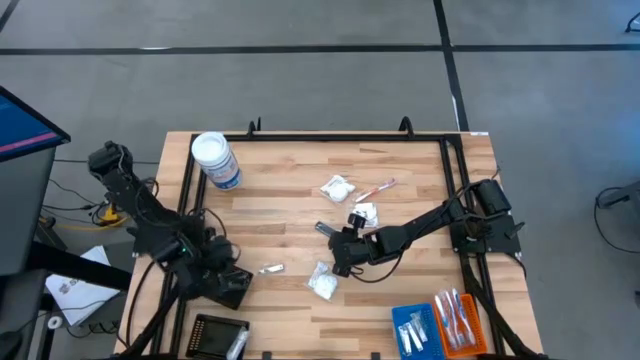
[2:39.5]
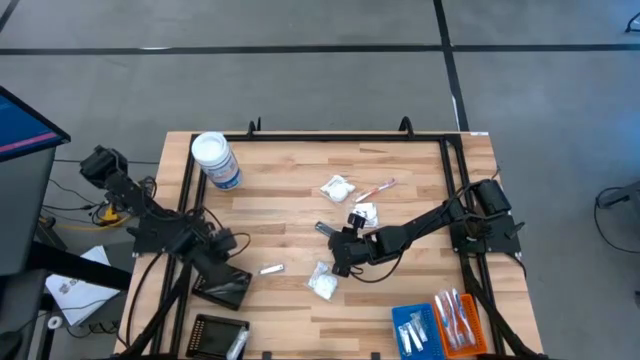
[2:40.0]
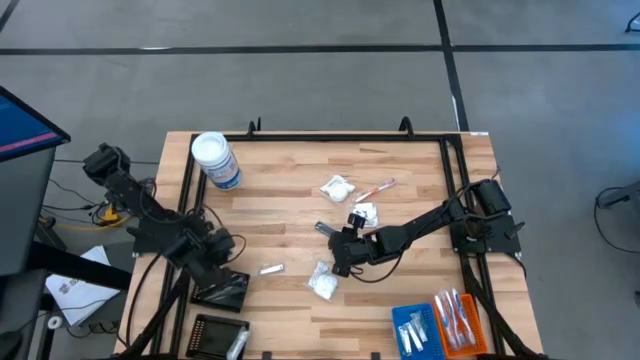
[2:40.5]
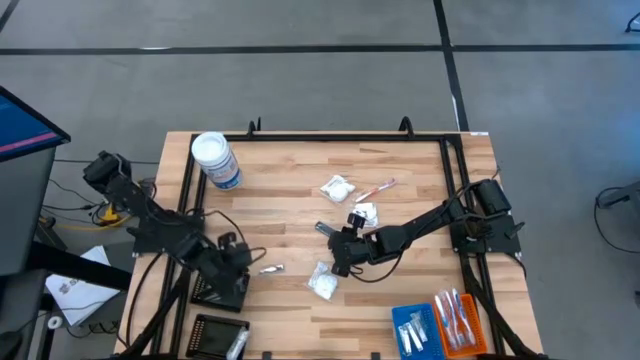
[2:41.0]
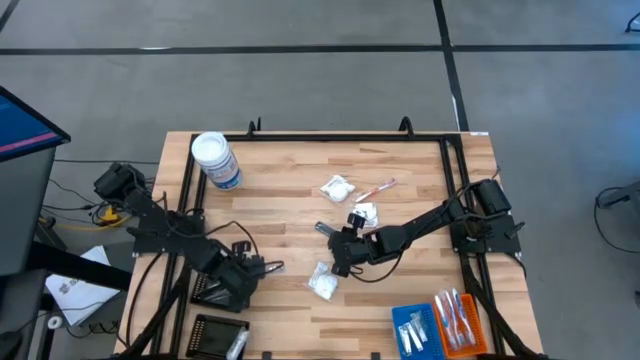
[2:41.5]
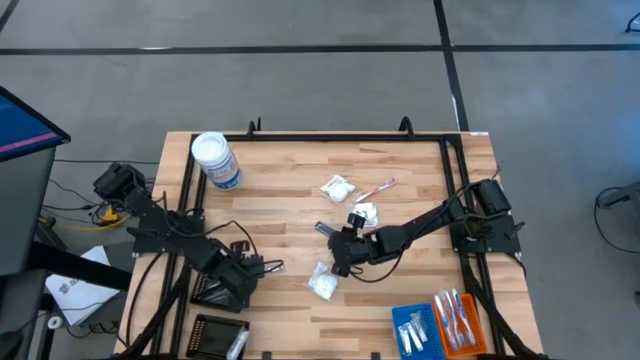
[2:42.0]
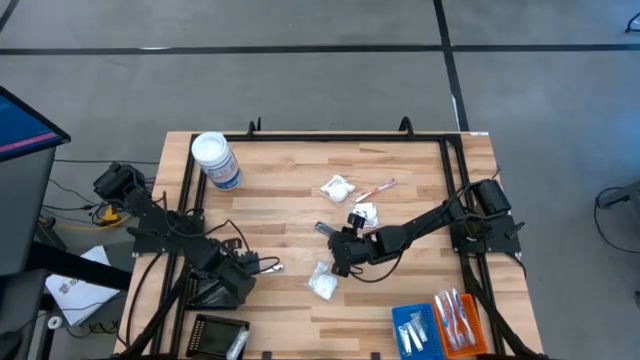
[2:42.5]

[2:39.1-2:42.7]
Task: Pick & Place Travel size toiletries
Adjust the top black bin

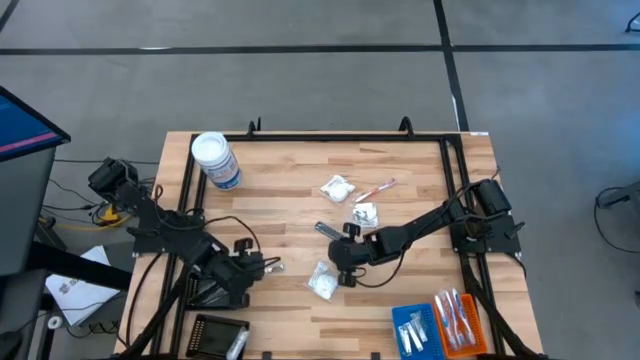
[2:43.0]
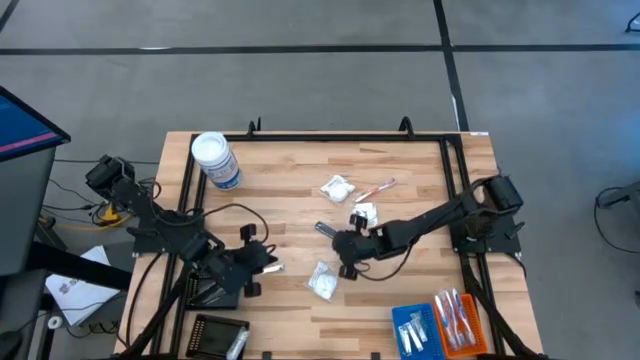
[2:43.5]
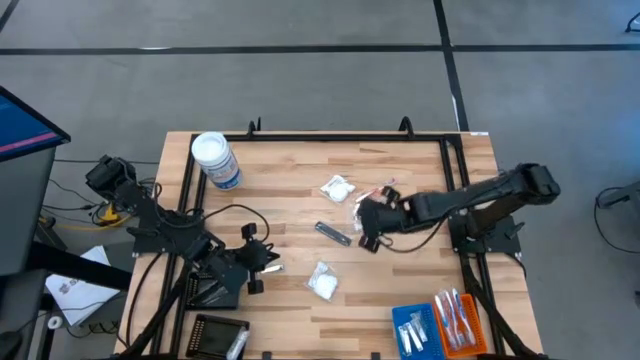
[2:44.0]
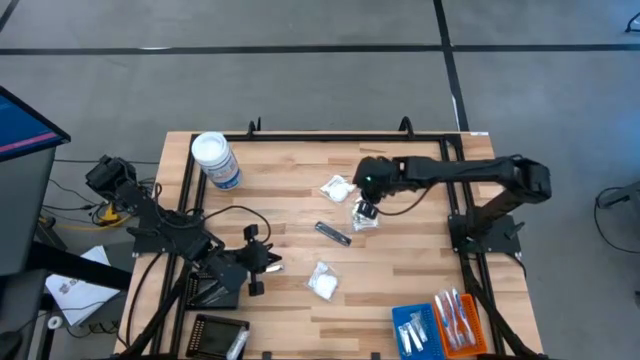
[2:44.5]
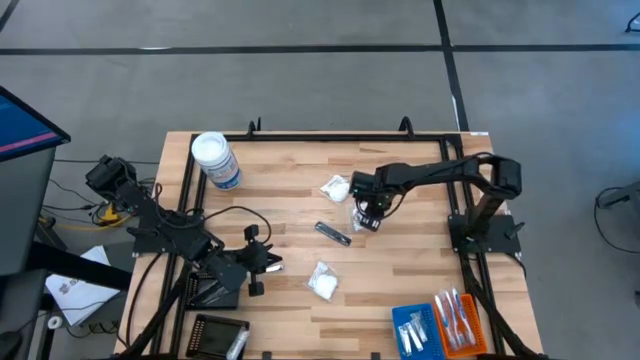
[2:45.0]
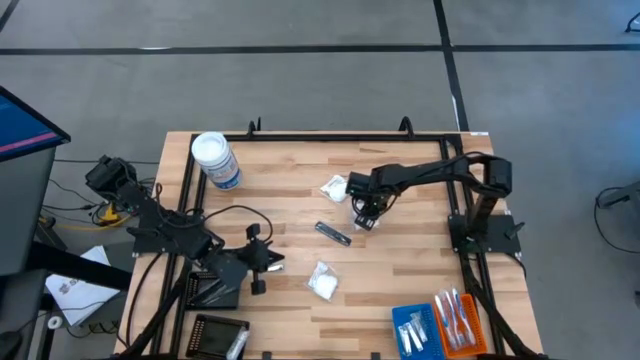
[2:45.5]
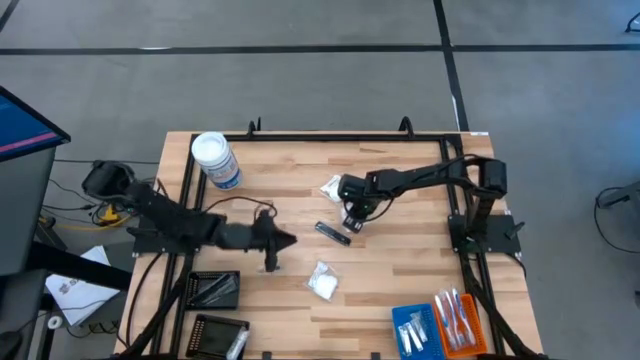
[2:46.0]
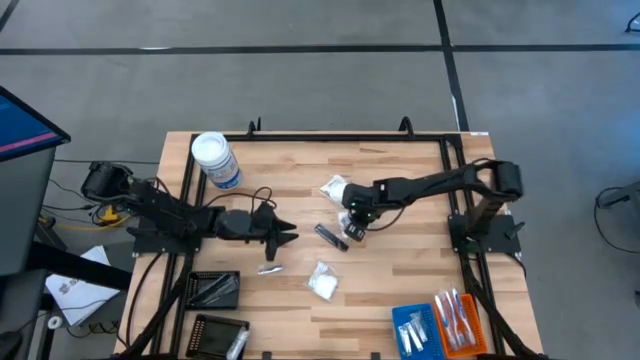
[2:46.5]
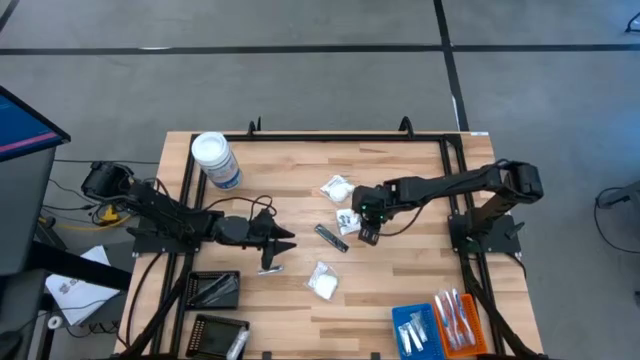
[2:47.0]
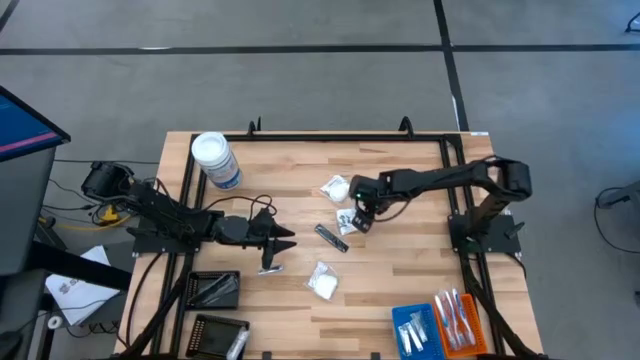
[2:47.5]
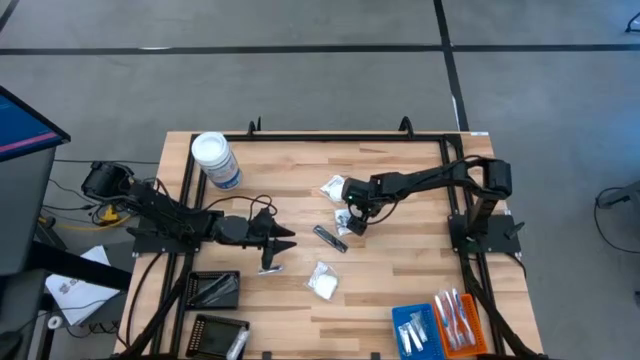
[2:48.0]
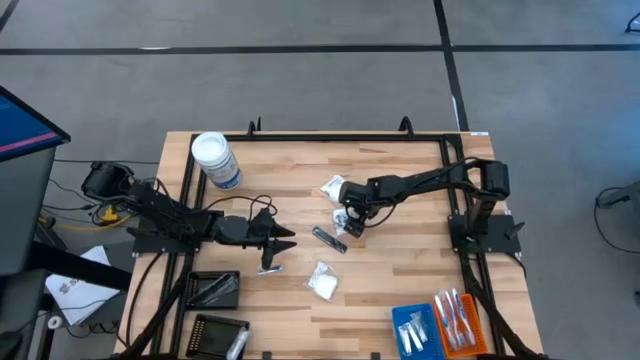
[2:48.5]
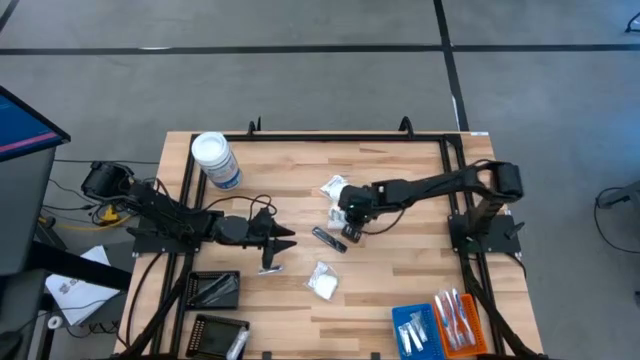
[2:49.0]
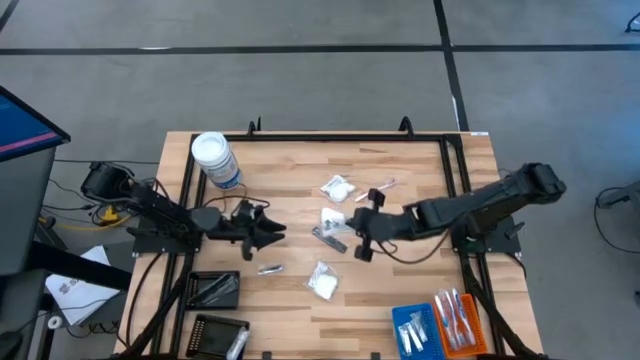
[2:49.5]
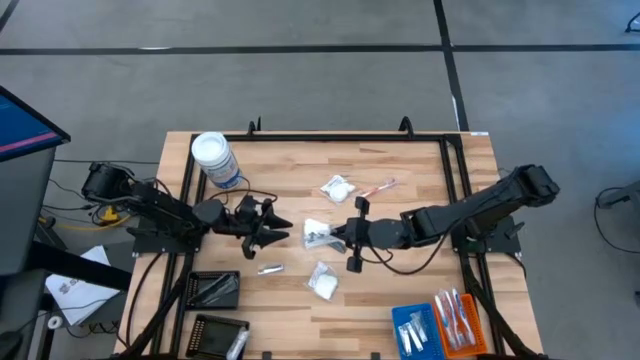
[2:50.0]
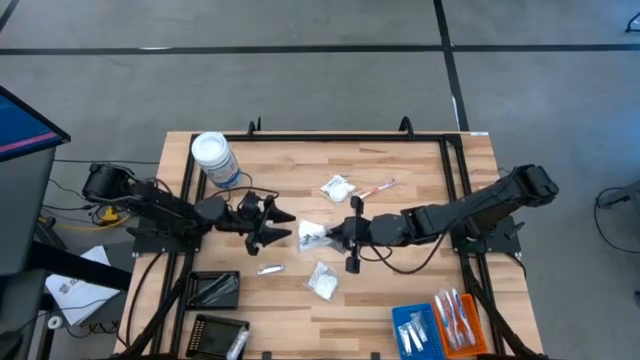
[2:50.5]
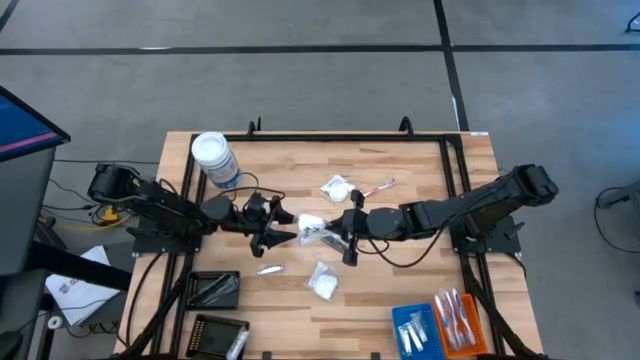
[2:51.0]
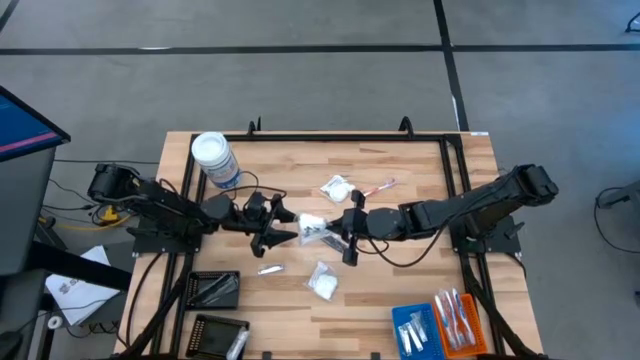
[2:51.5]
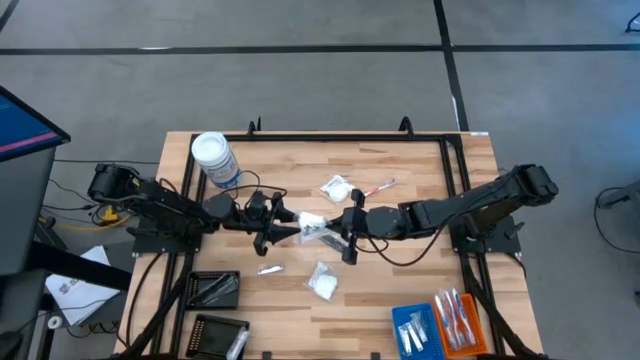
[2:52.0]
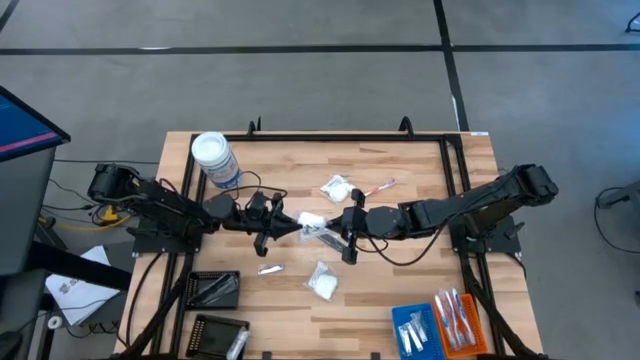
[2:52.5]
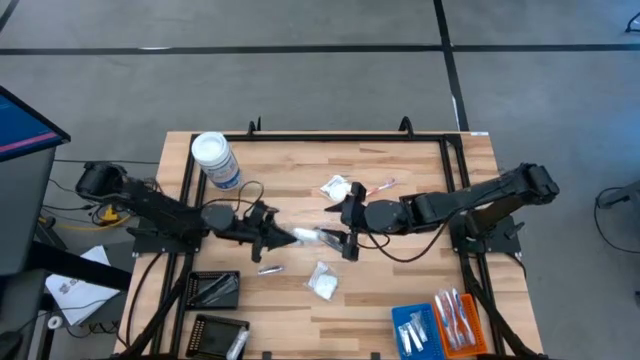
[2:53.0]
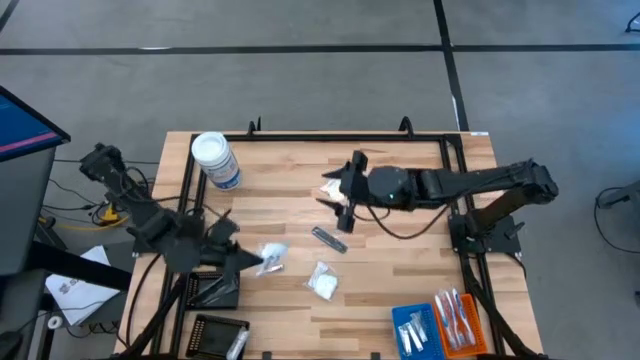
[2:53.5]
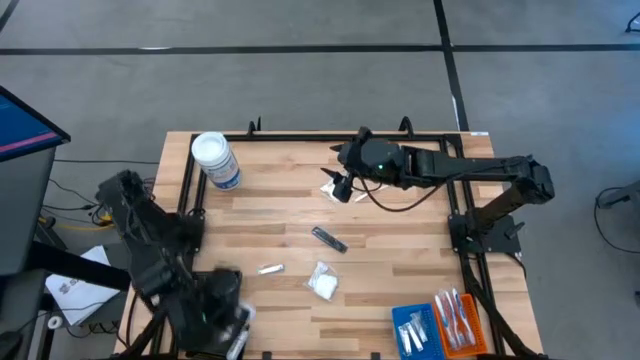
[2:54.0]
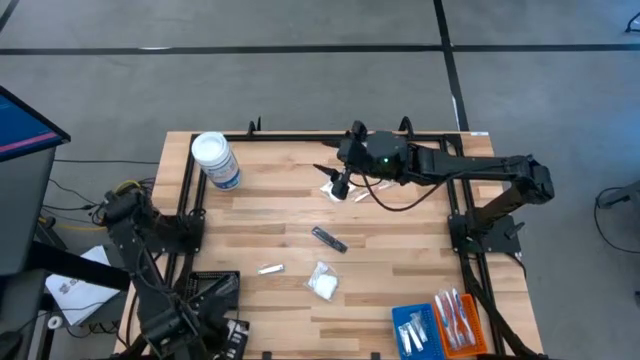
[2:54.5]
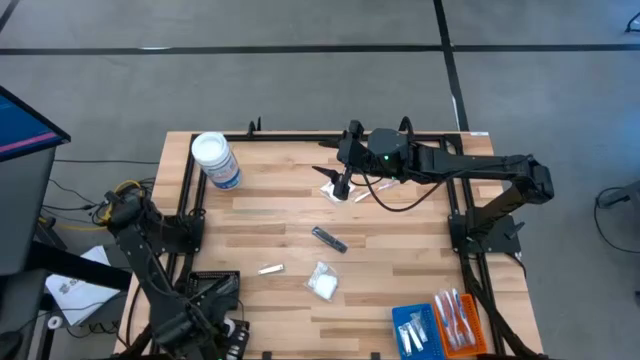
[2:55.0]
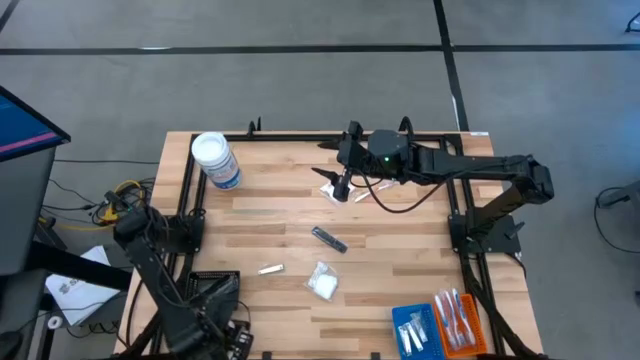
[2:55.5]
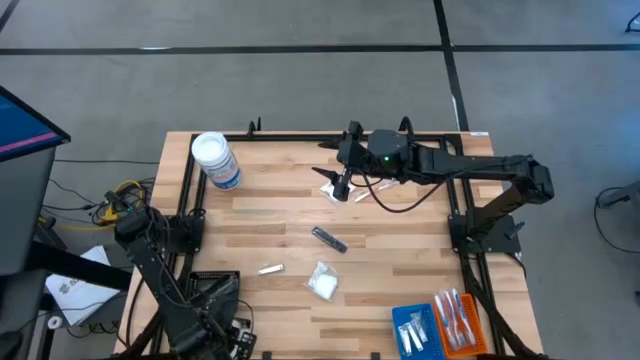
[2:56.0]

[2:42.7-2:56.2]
Put the vanity pack into the bottom black bin

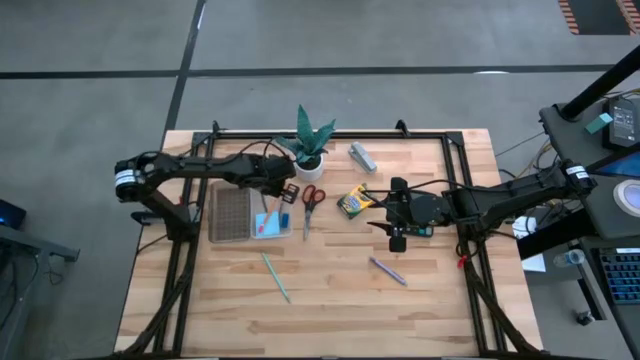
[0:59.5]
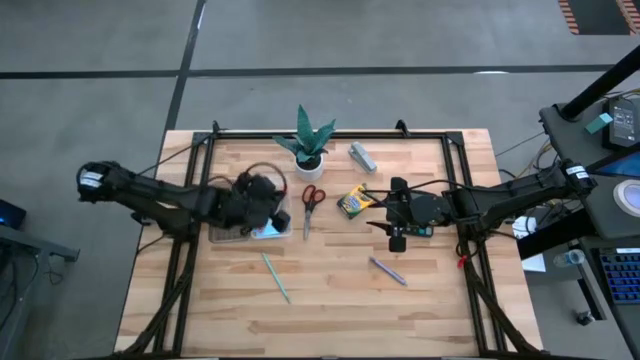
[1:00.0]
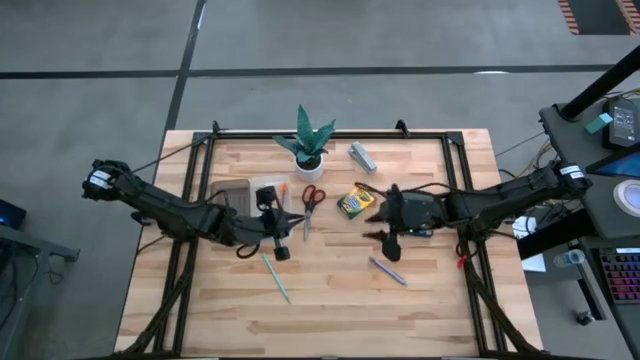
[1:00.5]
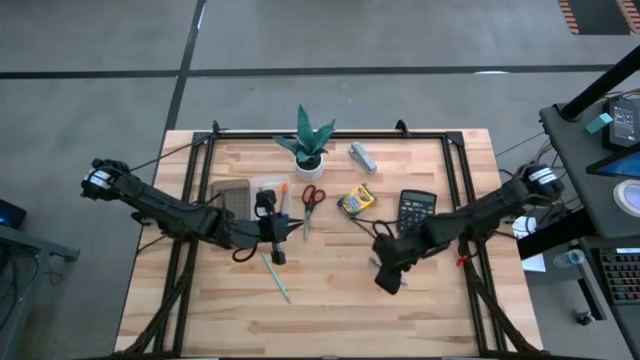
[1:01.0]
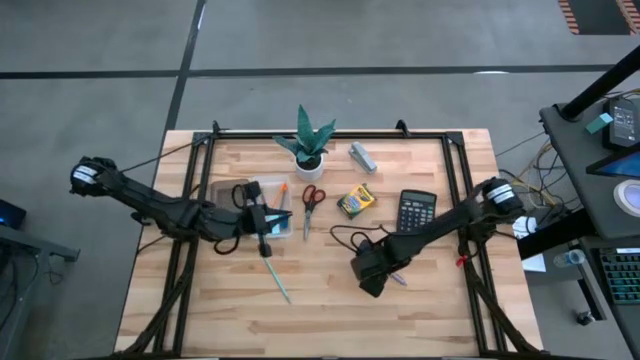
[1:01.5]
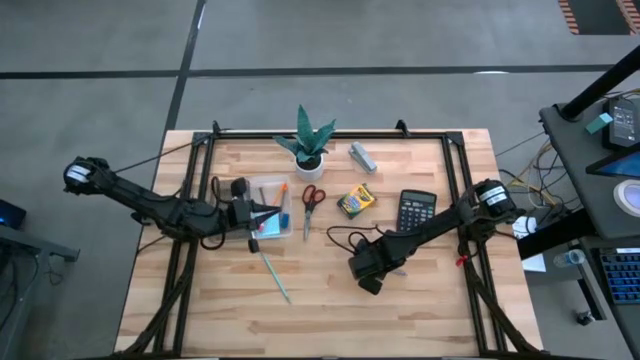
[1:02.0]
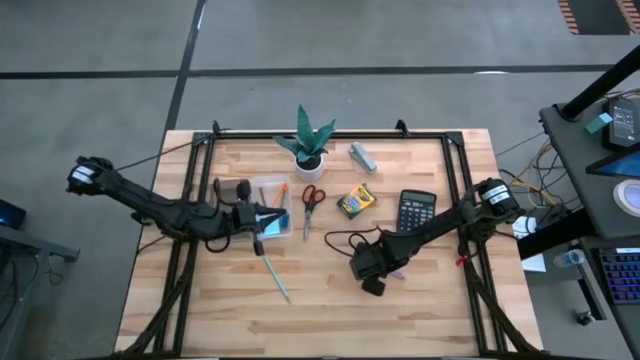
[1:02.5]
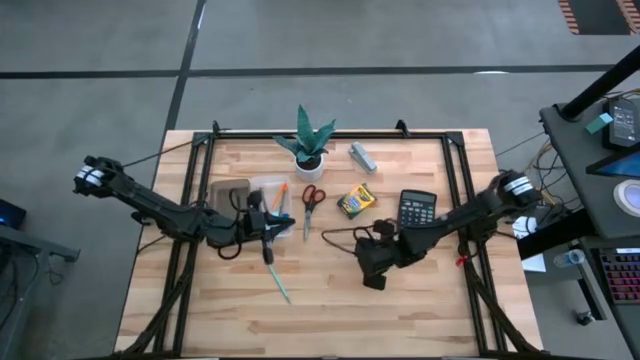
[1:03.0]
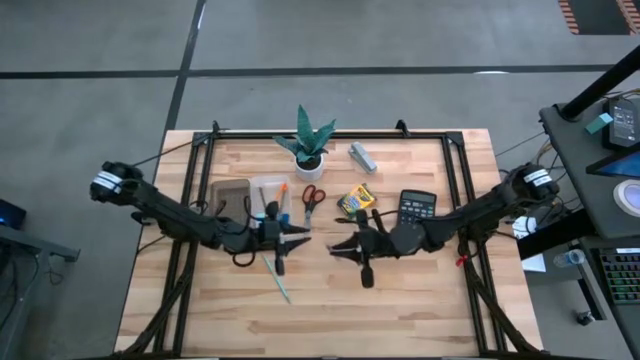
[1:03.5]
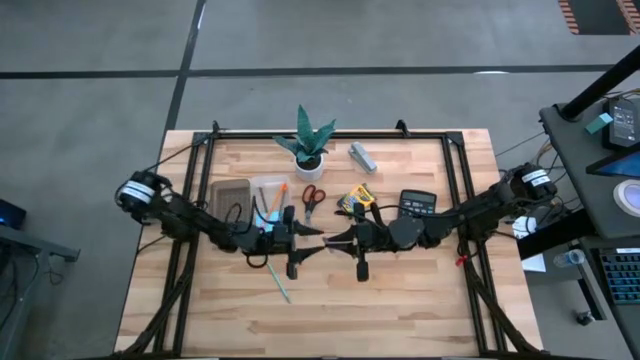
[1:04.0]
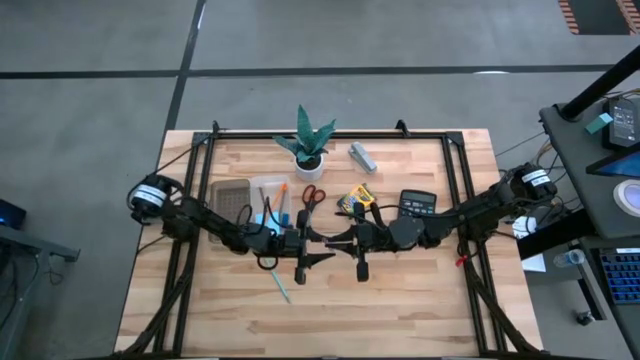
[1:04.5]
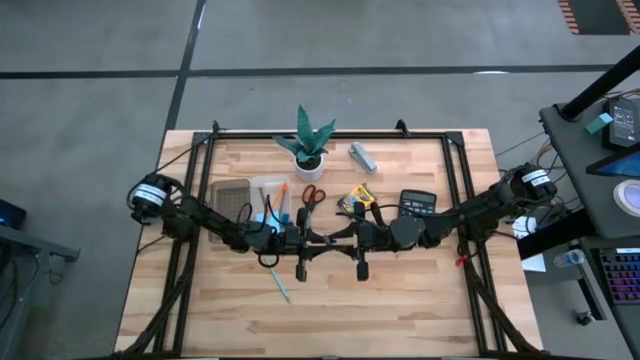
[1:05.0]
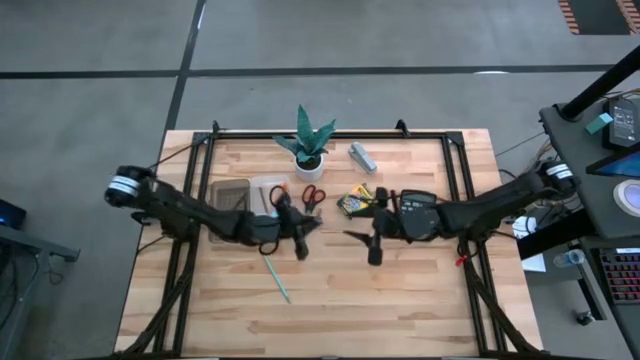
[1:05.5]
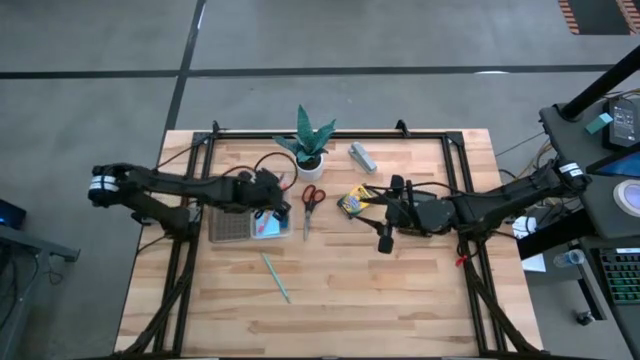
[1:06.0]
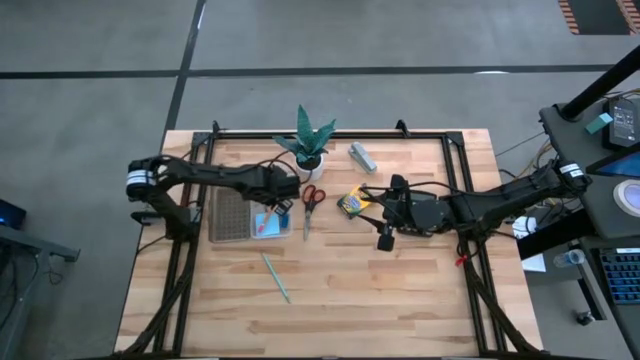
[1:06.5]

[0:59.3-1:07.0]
Task: Pack school essentials
Put the gray pen into the white and black box
